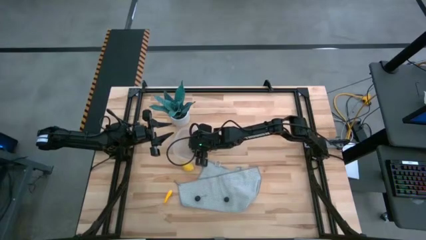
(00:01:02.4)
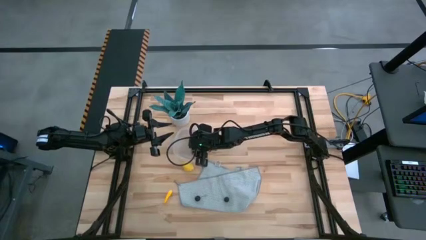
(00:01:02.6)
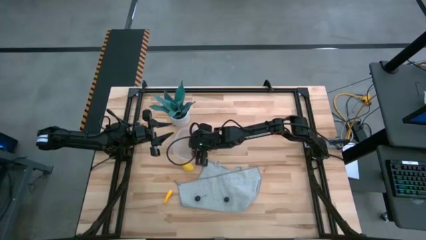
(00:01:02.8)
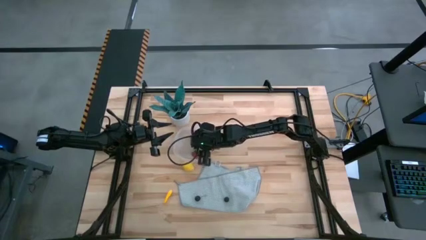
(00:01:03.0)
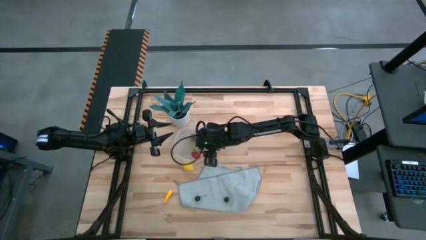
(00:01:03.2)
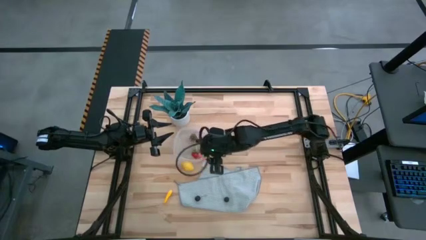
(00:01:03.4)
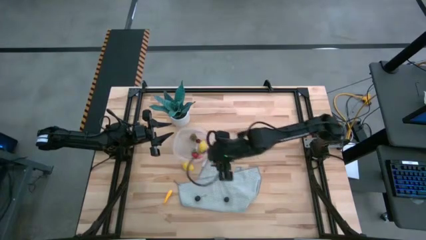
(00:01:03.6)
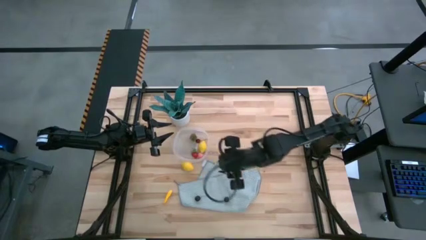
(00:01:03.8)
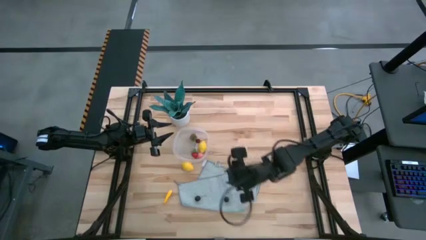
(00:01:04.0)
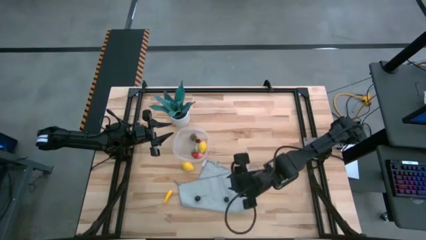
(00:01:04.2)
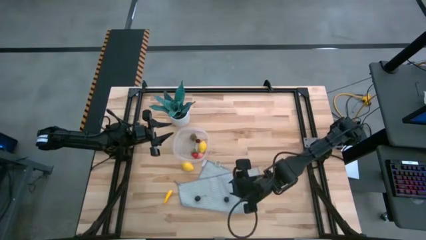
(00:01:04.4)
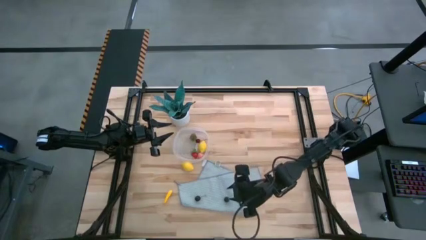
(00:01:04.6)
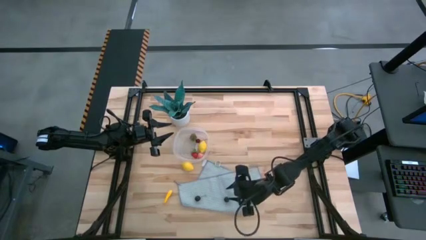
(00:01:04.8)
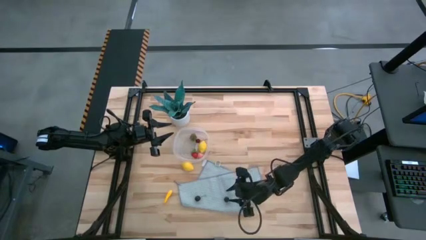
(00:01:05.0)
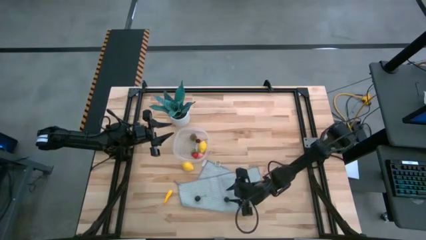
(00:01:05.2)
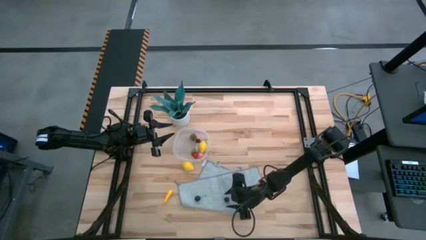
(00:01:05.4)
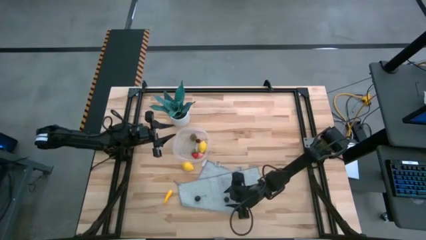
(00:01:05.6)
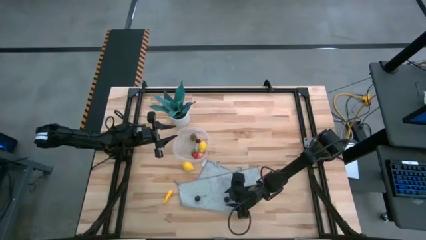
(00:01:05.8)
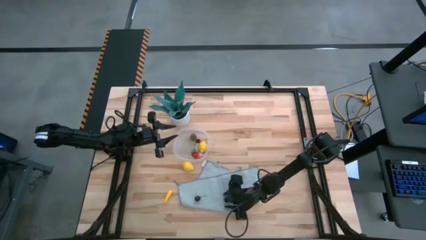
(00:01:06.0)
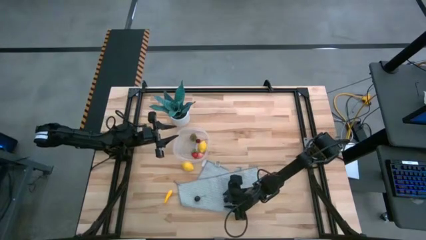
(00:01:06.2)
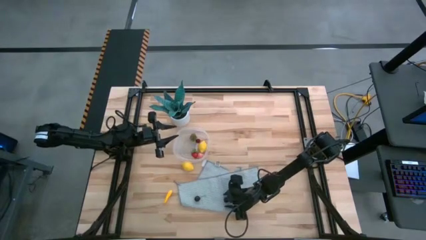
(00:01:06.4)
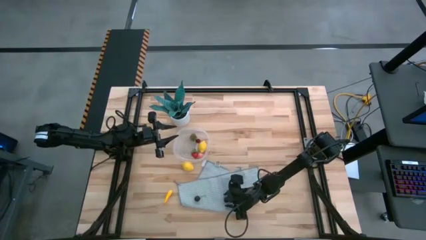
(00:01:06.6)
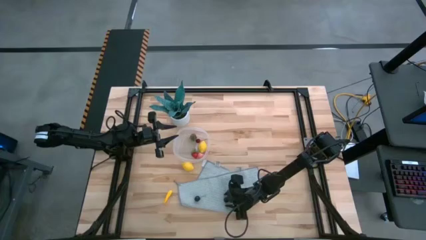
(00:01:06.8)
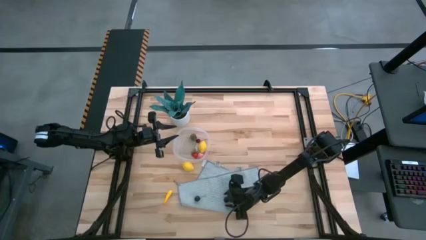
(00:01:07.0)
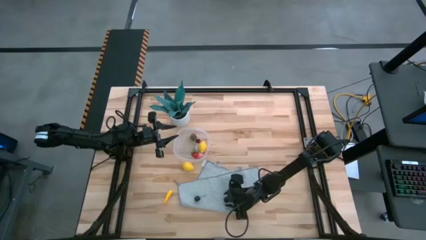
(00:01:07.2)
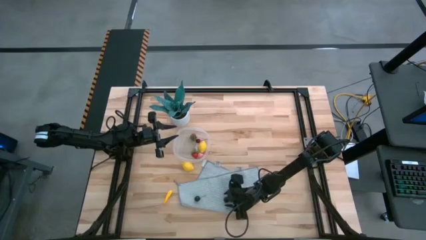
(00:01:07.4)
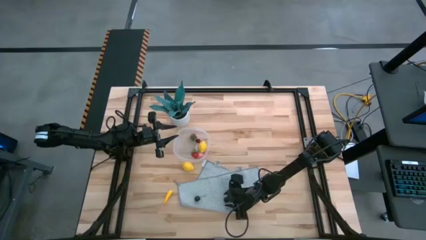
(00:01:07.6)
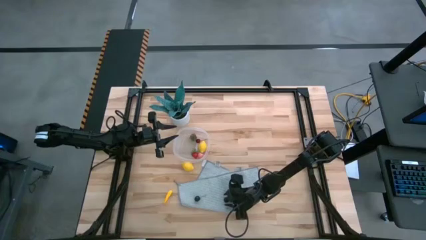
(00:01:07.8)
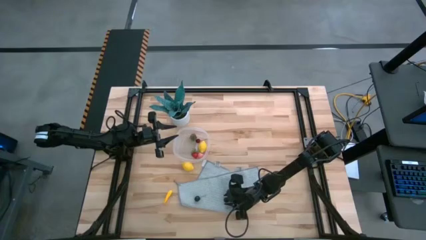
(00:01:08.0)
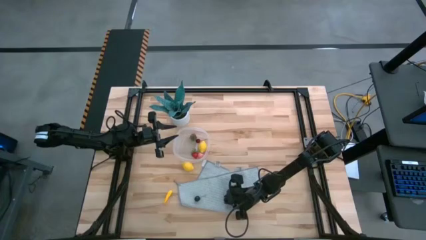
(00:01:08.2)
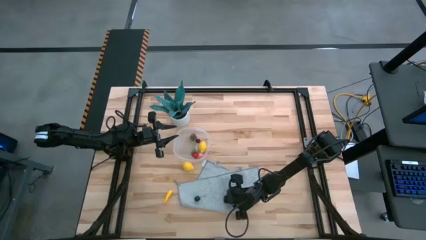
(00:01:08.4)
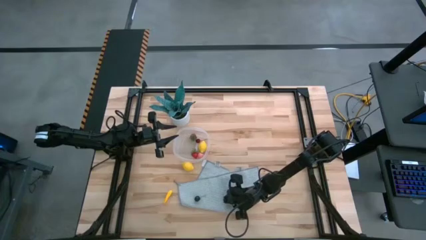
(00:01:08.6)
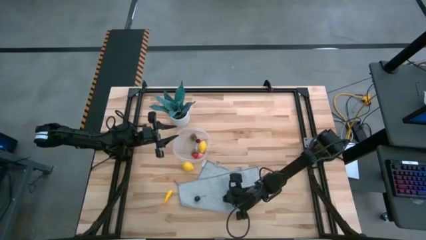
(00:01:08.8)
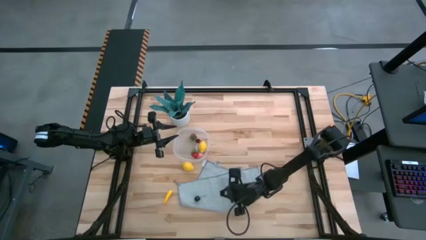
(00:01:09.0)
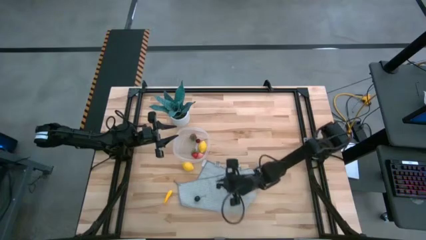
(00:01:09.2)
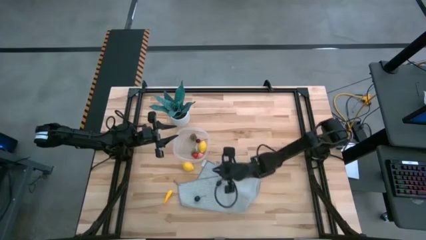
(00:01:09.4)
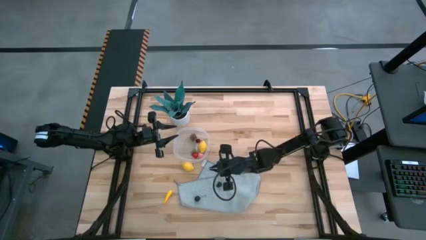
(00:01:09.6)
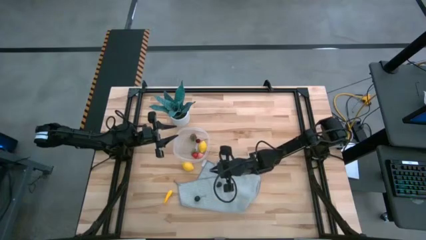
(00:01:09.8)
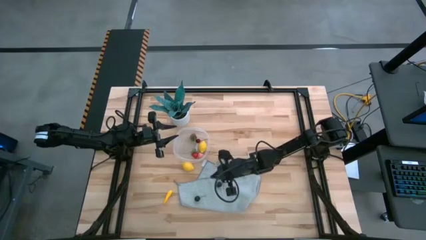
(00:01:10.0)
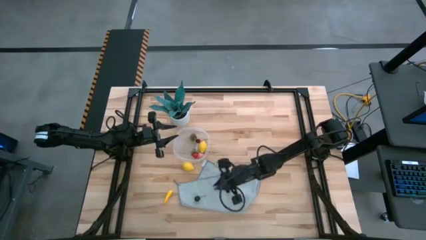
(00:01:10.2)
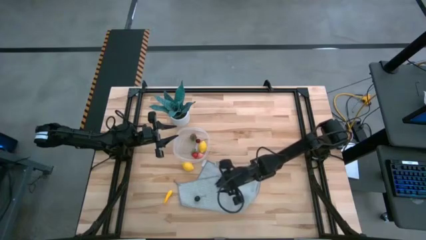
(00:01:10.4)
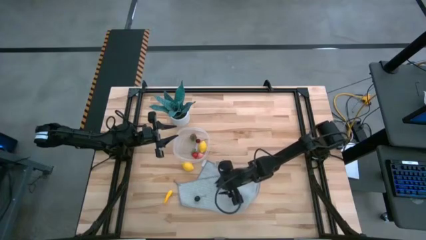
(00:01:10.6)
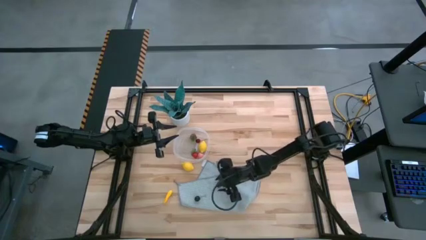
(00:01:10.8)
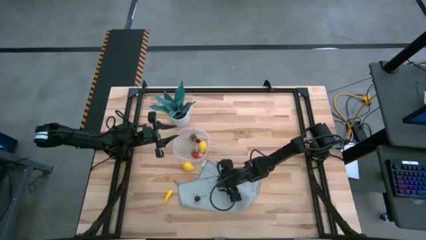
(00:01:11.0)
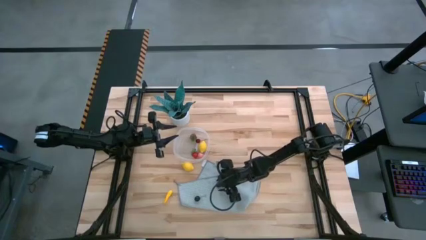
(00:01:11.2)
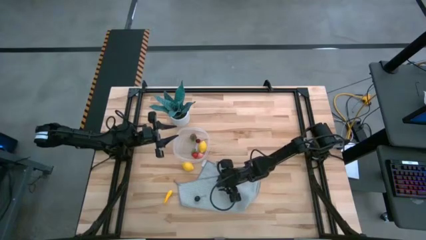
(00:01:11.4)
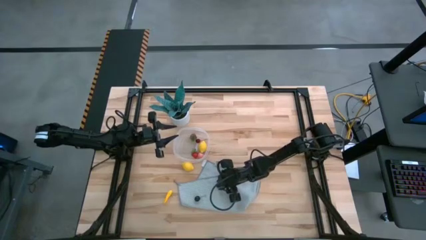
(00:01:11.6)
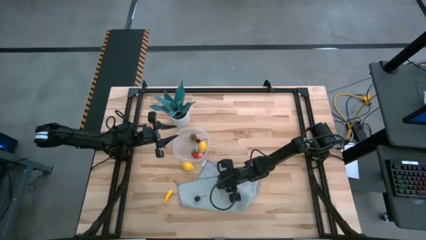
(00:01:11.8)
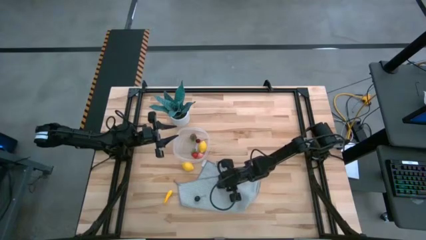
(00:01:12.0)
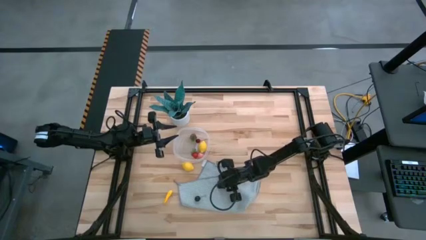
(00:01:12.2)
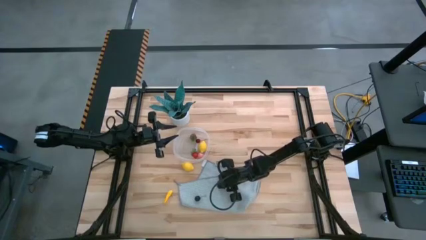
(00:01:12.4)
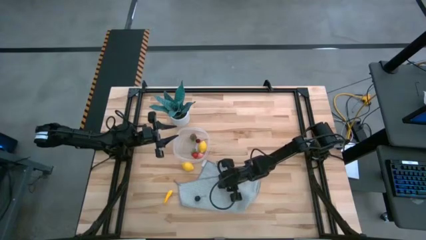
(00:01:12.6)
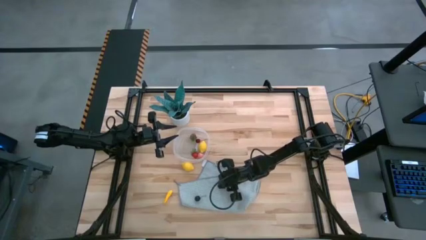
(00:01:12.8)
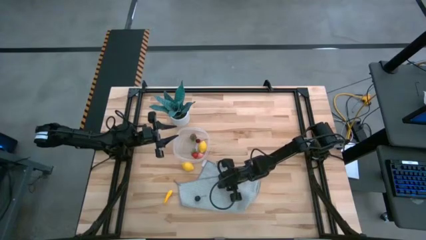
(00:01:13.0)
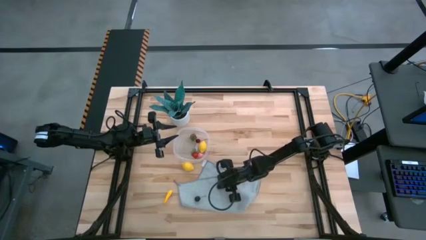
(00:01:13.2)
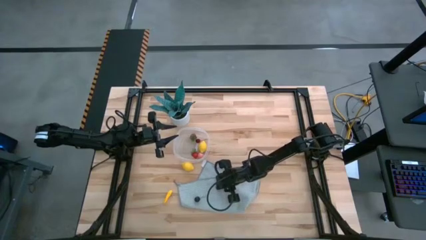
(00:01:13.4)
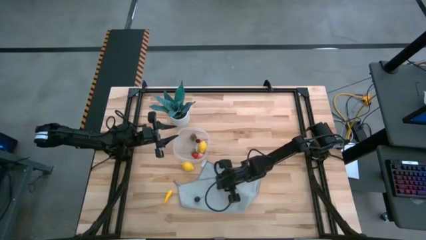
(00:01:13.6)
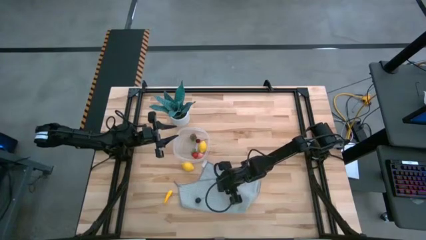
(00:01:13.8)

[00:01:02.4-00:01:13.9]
Task: Pick and placing Produce into tupperware
Put the blackberry into the container

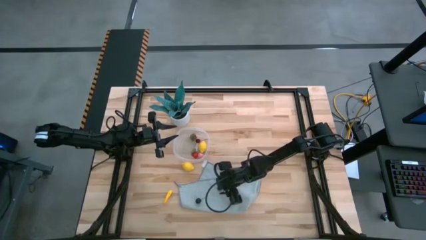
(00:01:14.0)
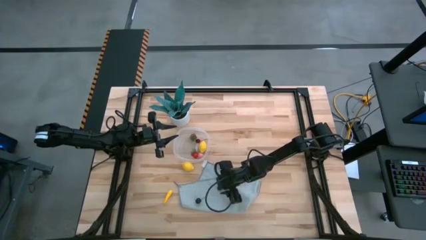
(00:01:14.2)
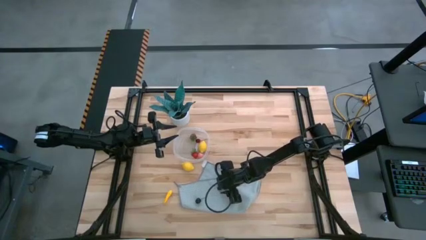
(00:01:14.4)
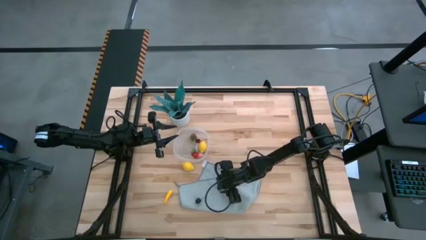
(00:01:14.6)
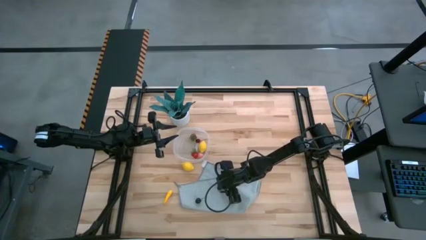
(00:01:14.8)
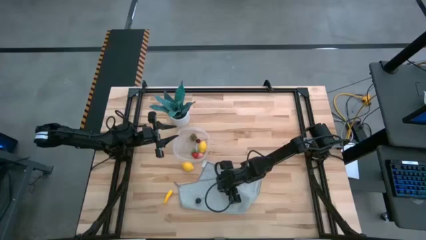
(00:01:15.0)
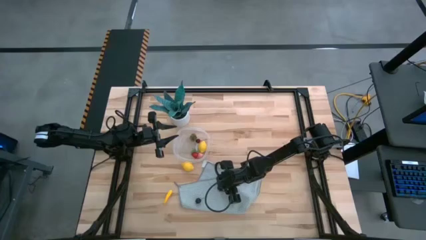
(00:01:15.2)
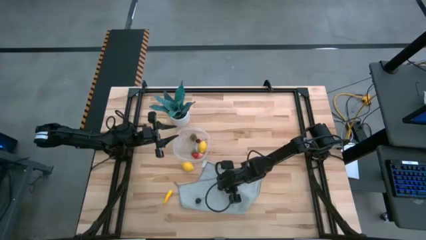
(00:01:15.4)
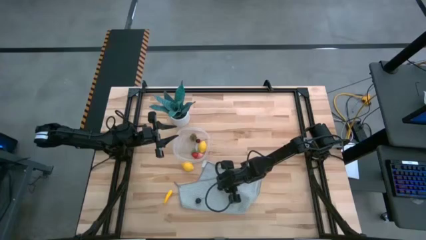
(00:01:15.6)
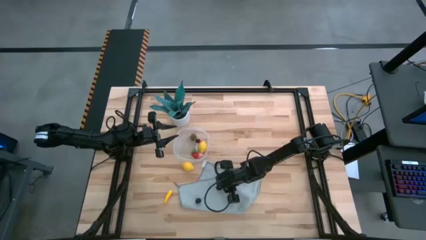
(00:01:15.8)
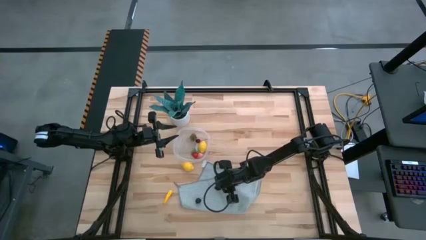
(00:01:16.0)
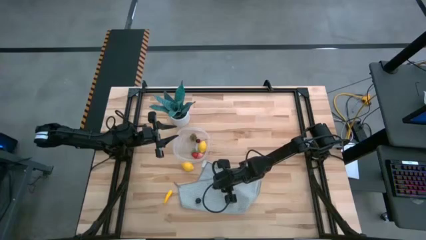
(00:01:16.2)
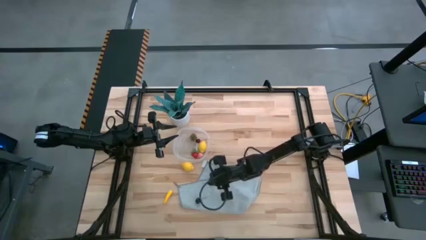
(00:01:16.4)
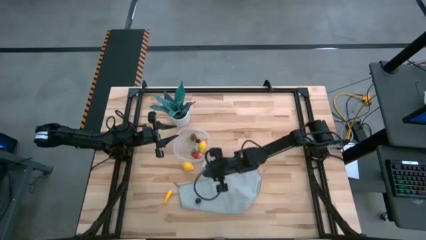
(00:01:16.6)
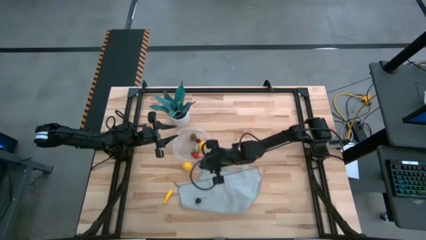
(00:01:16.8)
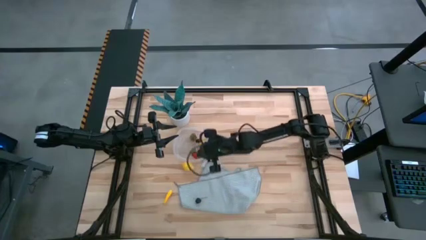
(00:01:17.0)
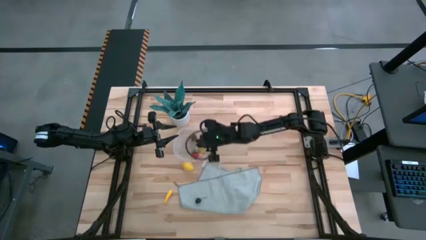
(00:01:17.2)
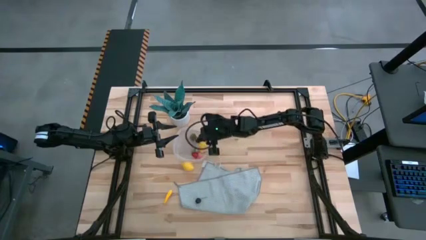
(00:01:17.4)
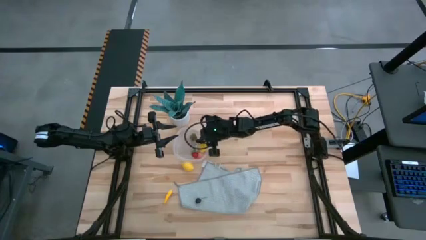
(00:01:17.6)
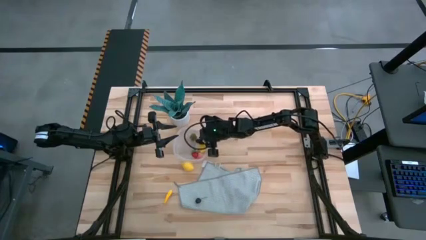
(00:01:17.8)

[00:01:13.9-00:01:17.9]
Put the blackberry into the container
